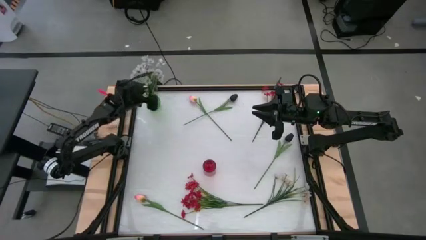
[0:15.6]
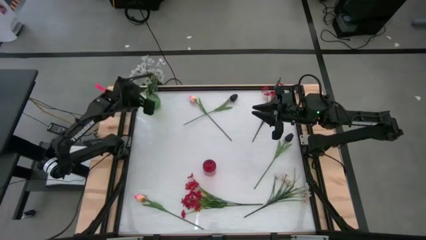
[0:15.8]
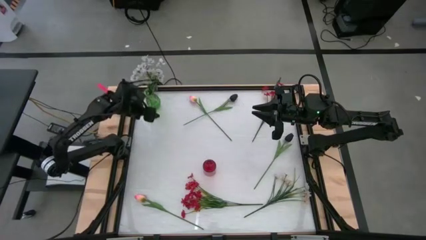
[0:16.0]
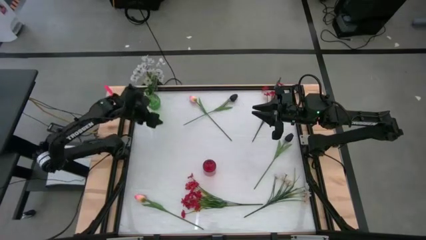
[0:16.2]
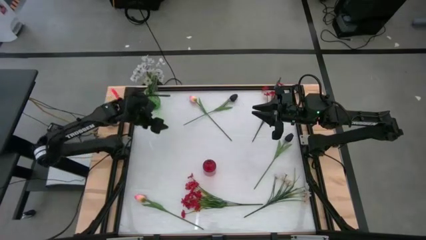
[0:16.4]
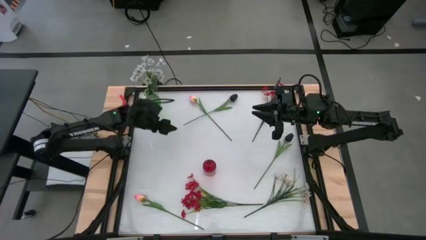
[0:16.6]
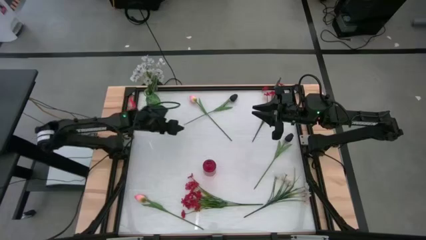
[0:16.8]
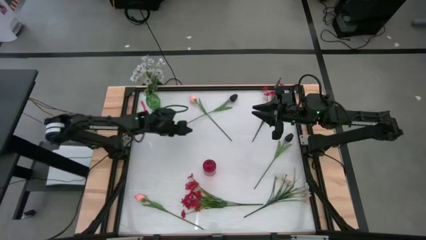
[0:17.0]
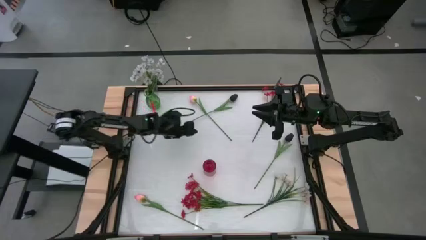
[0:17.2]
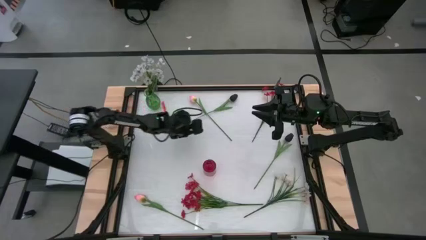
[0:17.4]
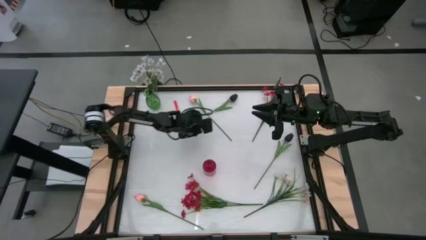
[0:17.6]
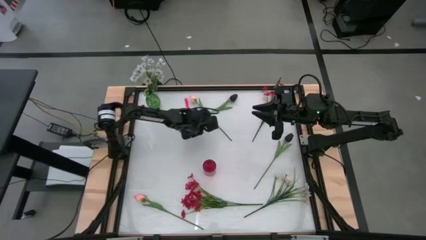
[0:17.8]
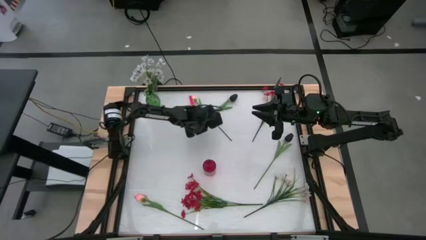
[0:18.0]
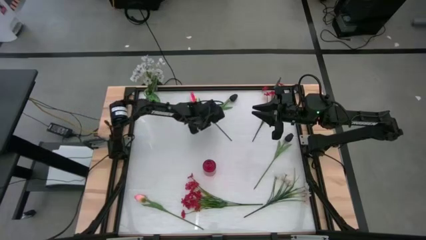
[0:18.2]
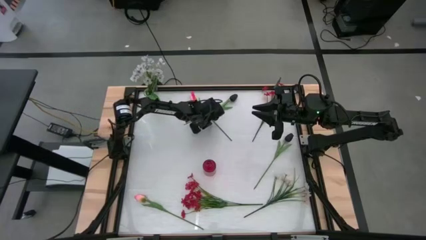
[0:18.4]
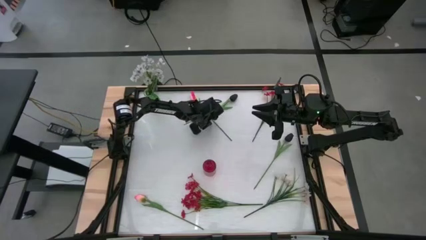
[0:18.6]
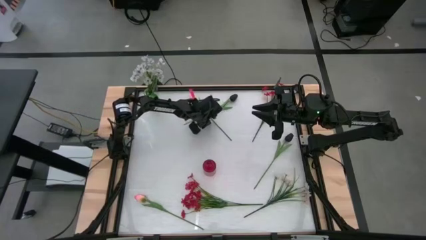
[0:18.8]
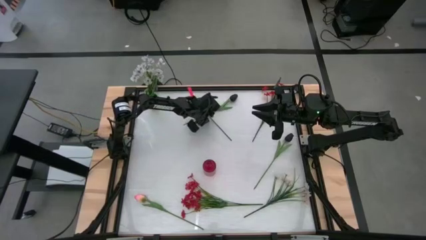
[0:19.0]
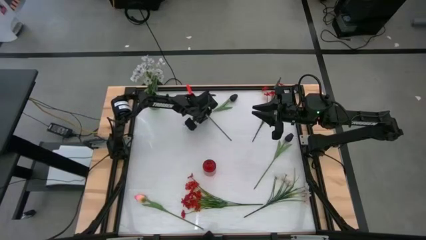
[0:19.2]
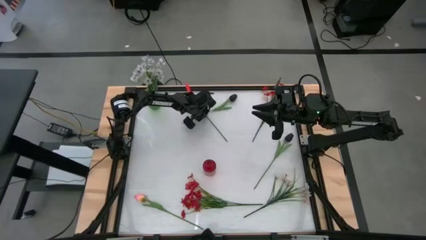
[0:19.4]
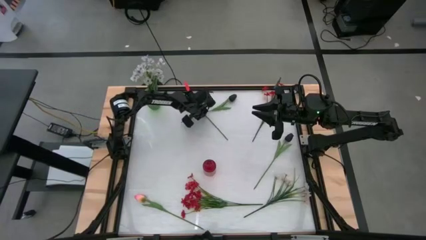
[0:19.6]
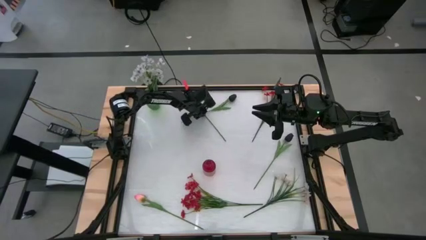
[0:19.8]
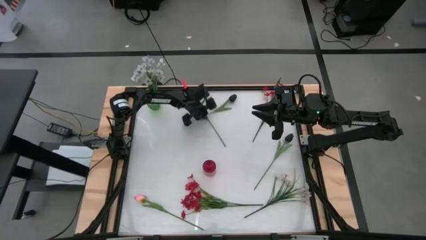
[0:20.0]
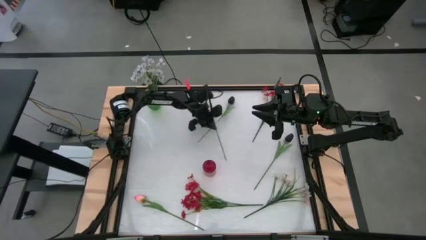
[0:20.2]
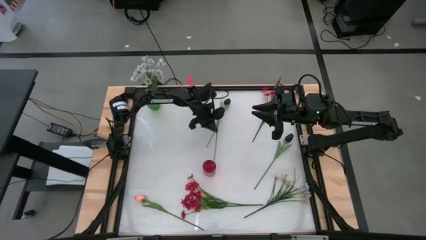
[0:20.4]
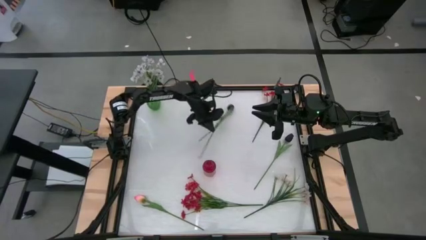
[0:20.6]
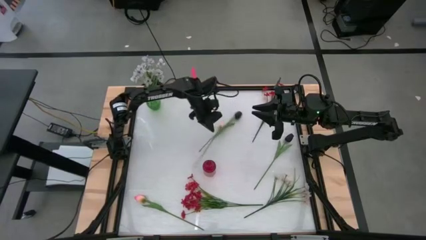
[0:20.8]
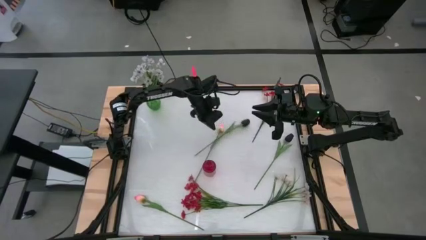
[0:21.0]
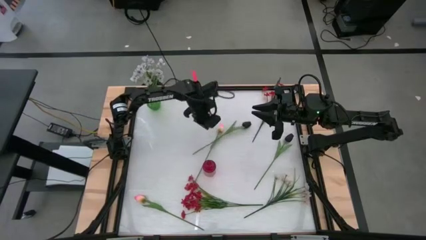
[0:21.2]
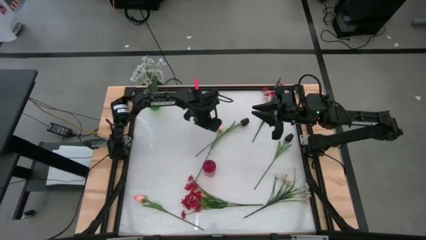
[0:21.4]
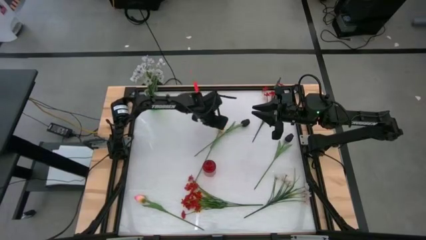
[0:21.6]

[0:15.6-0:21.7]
Task: Sort flowers into vase by color
Put the top pink flowers into the green flower vase

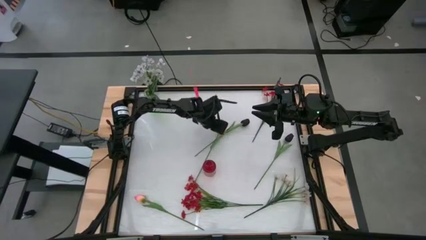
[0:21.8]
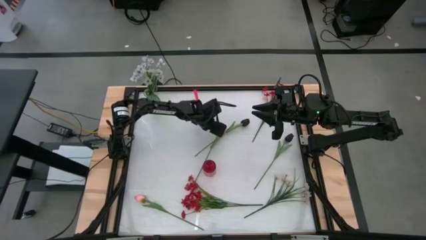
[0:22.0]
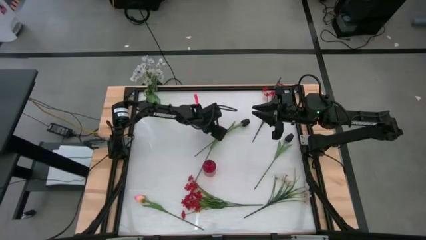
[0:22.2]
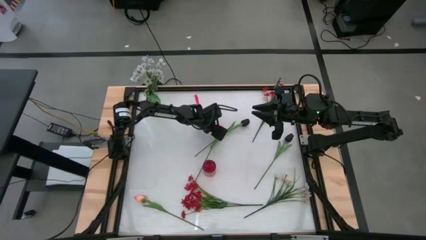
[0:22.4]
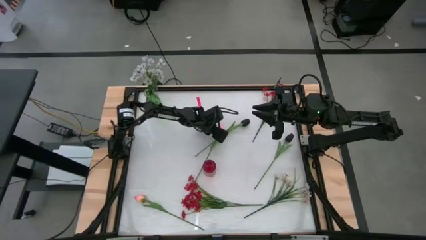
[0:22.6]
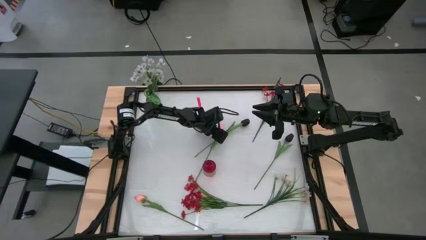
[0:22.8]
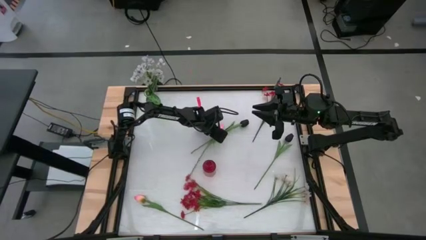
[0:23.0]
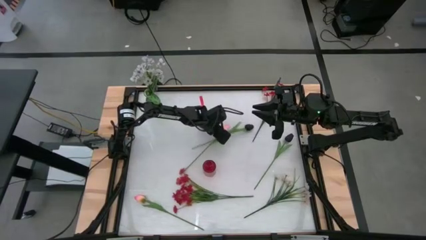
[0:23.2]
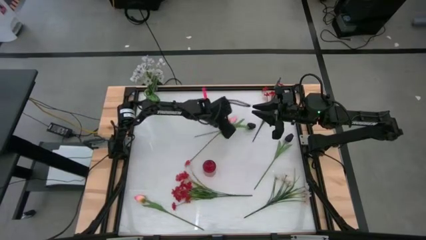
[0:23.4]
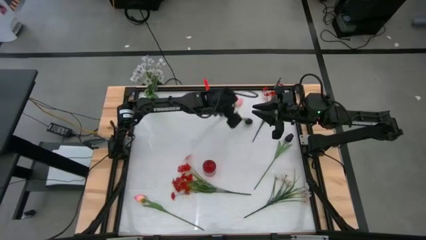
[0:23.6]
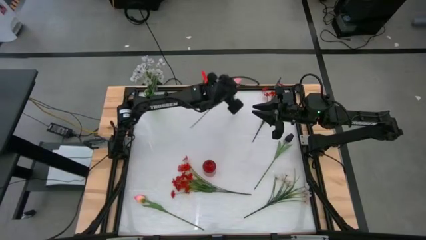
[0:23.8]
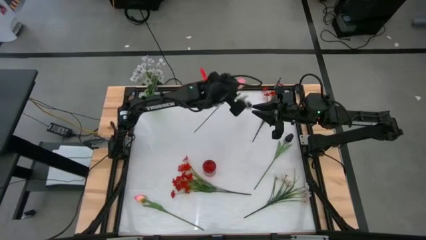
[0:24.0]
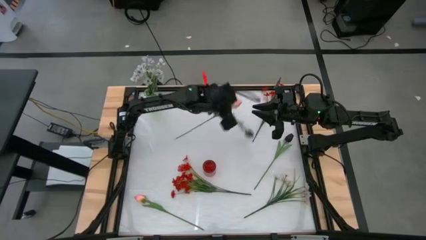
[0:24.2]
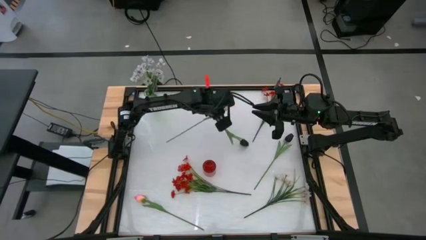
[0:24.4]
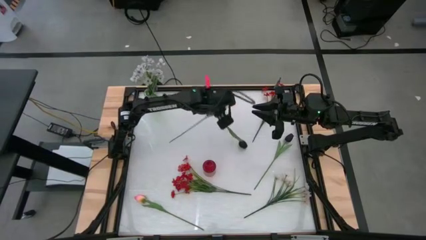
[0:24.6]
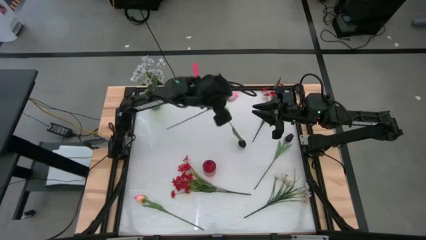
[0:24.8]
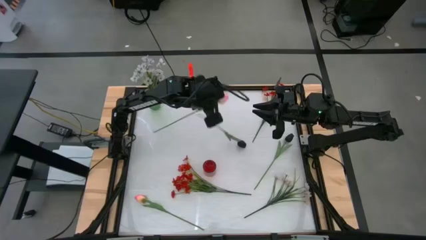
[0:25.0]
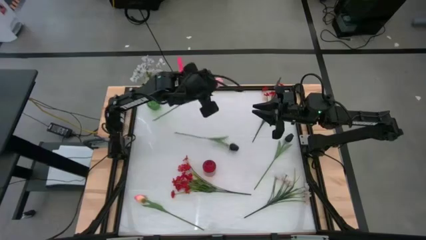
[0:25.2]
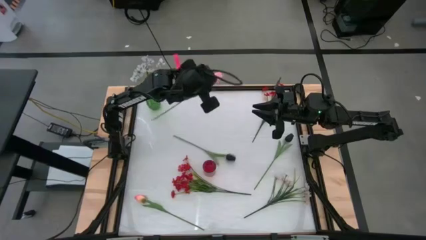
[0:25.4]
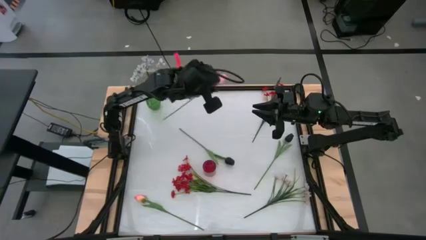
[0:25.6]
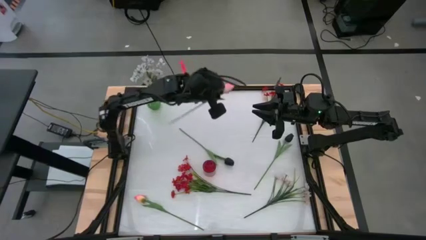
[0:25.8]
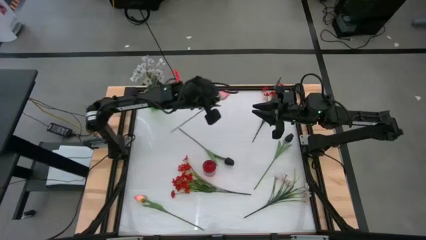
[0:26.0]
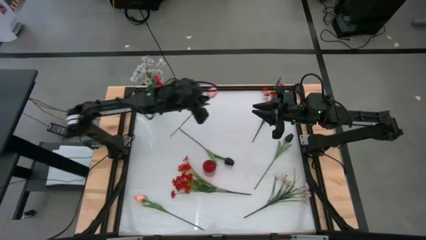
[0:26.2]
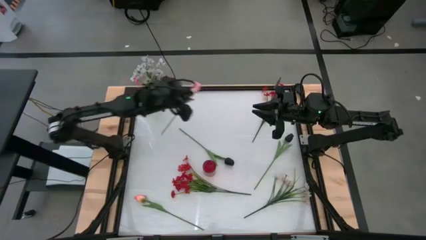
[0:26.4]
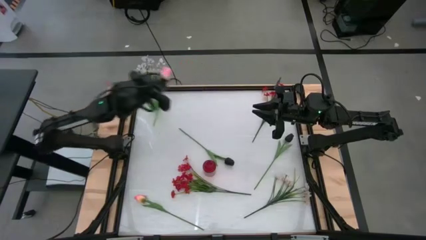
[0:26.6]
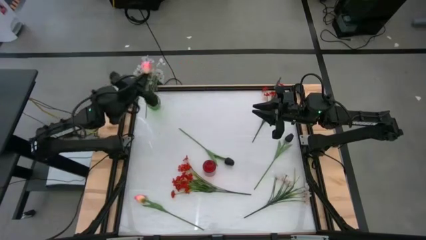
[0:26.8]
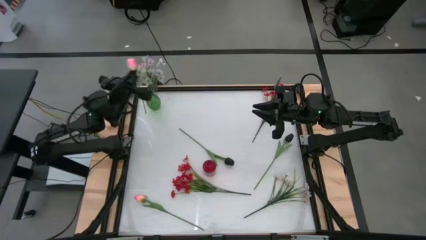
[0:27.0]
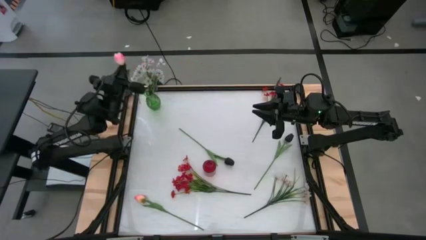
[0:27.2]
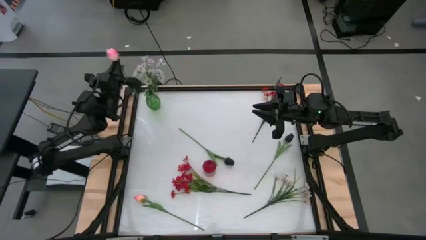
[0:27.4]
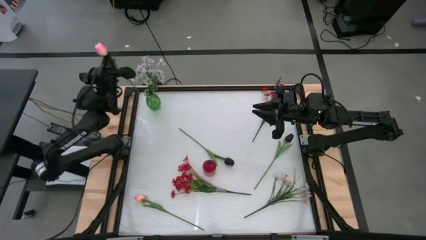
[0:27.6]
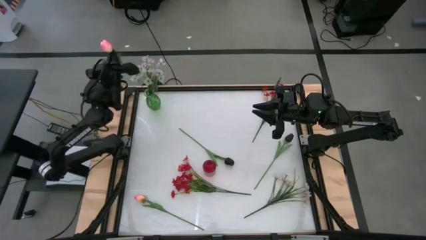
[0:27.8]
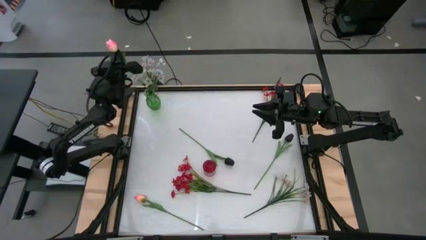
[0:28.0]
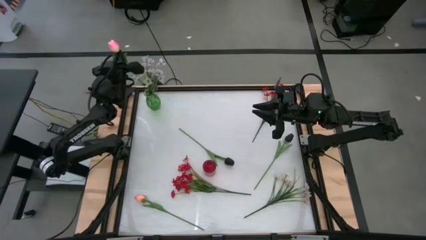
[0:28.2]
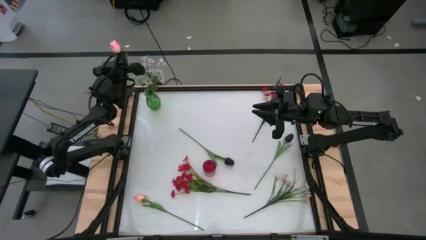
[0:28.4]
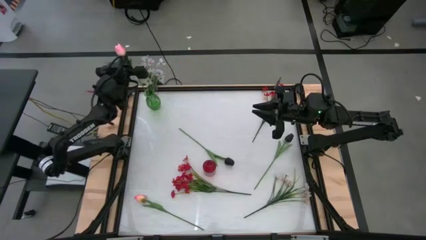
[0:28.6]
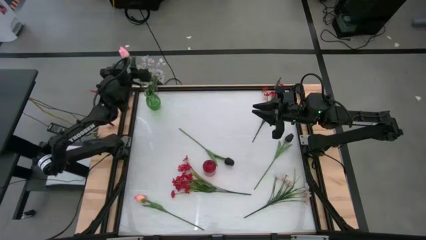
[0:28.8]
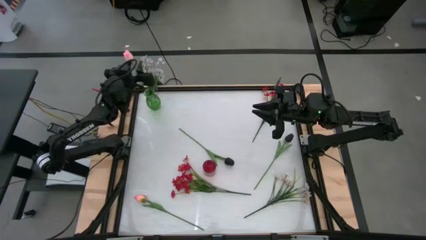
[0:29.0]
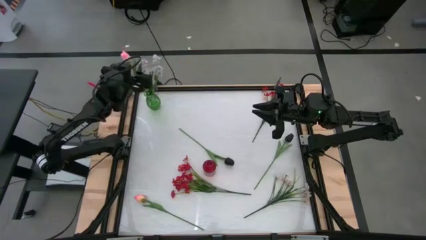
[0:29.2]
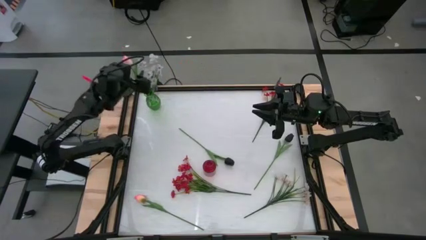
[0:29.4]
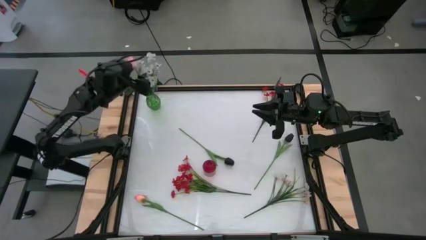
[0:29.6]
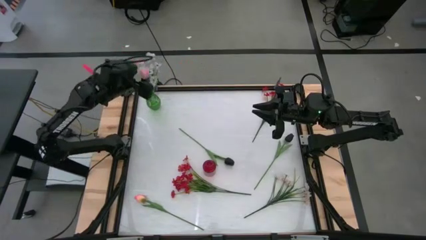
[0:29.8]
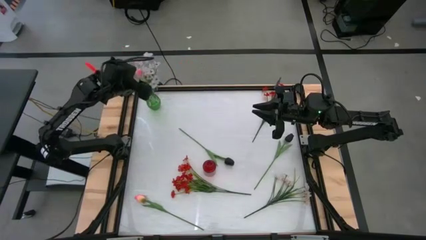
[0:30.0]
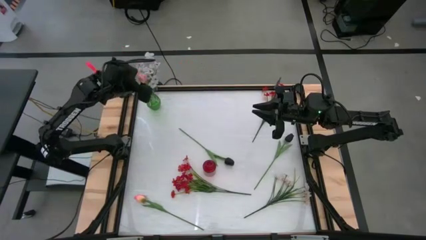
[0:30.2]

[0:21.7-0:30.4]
Put the top pink flowers into the green flower vase
